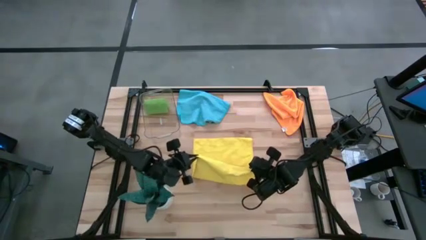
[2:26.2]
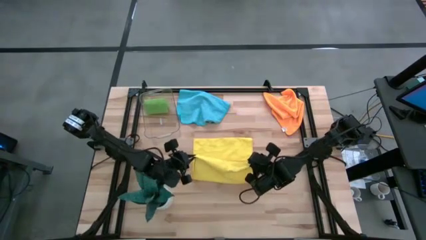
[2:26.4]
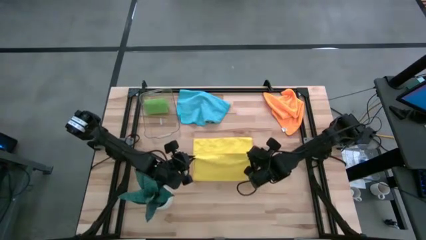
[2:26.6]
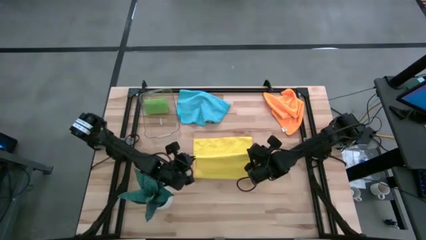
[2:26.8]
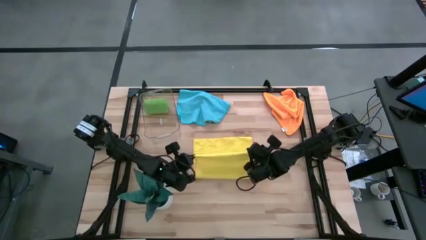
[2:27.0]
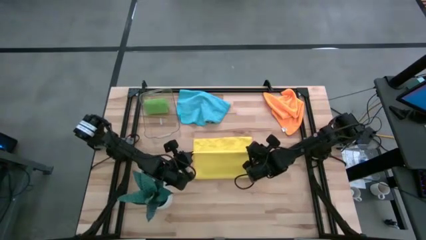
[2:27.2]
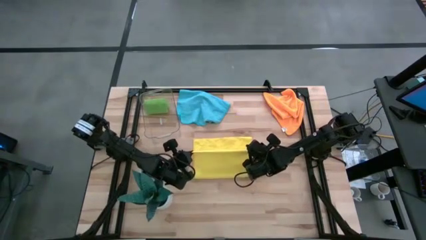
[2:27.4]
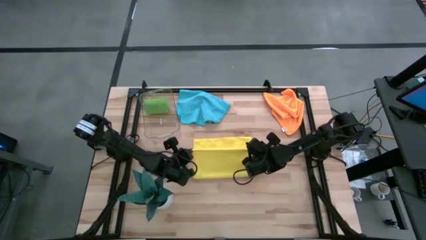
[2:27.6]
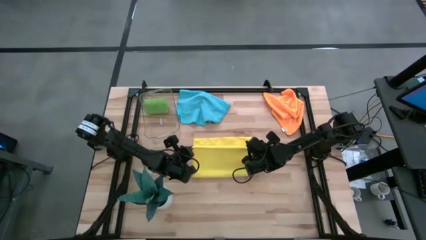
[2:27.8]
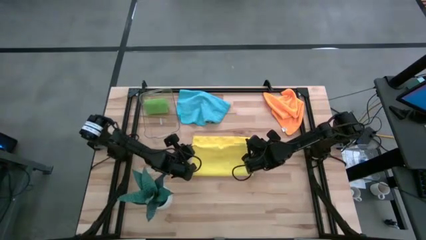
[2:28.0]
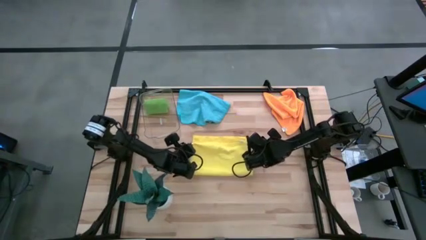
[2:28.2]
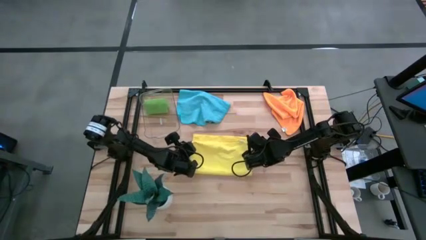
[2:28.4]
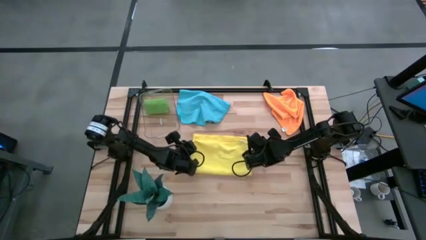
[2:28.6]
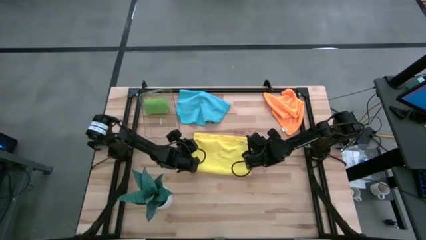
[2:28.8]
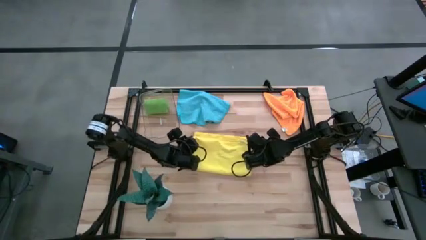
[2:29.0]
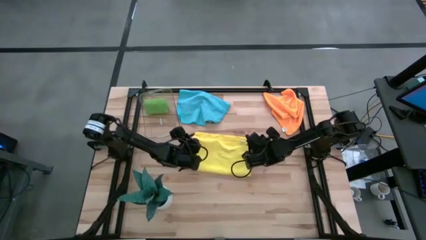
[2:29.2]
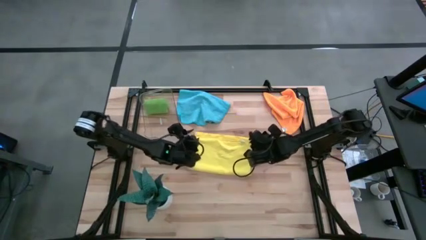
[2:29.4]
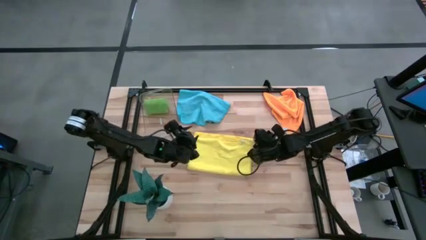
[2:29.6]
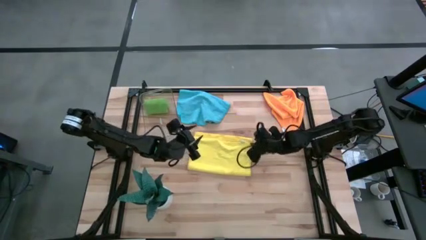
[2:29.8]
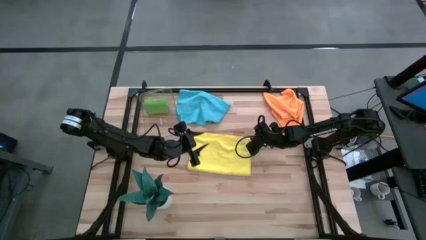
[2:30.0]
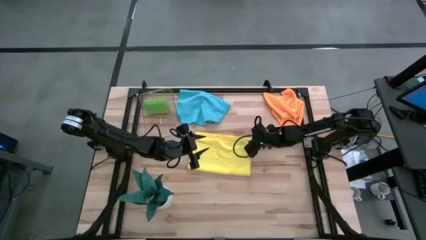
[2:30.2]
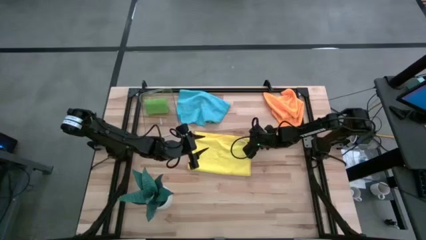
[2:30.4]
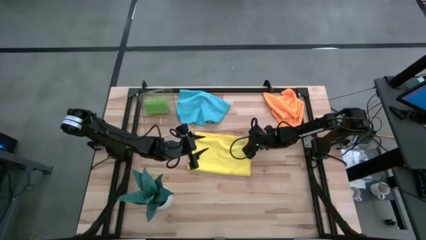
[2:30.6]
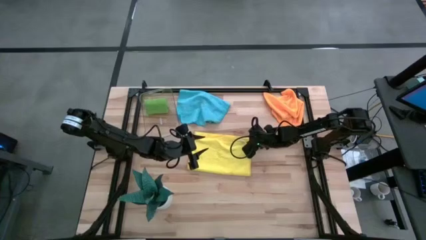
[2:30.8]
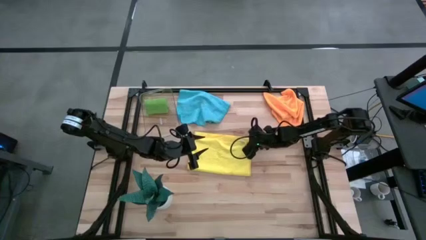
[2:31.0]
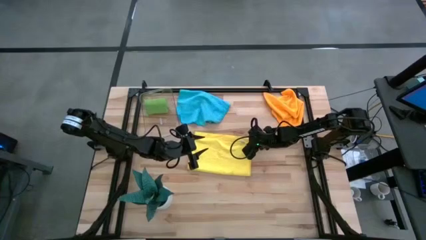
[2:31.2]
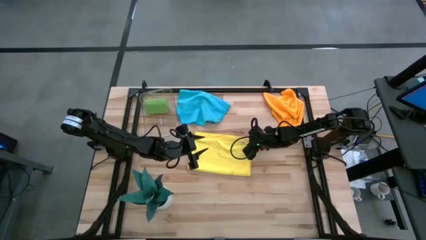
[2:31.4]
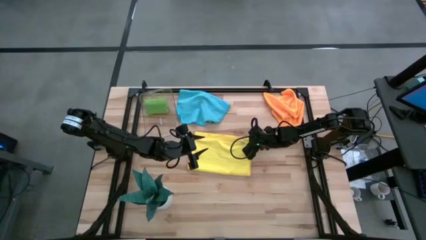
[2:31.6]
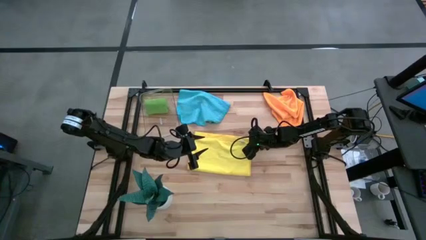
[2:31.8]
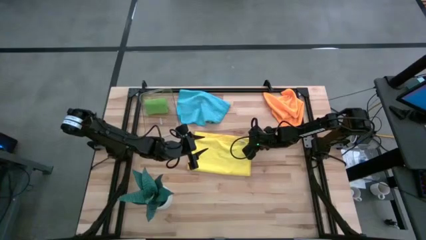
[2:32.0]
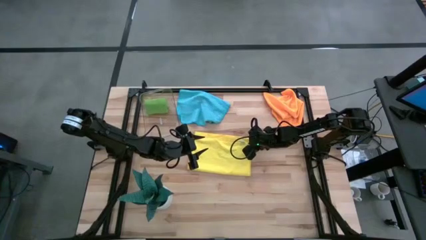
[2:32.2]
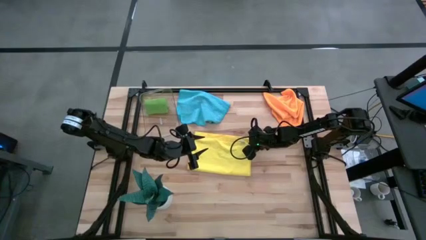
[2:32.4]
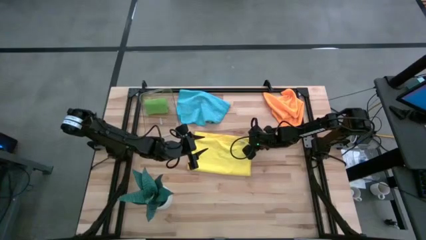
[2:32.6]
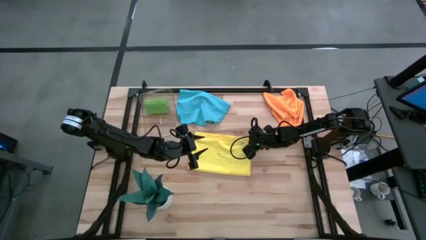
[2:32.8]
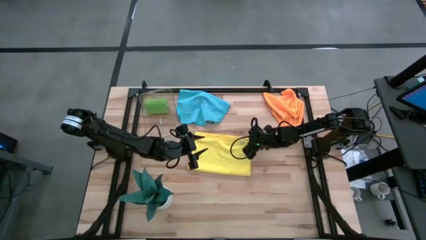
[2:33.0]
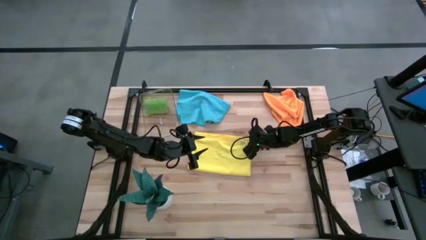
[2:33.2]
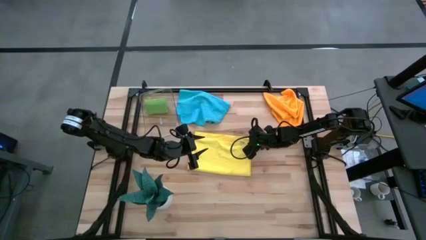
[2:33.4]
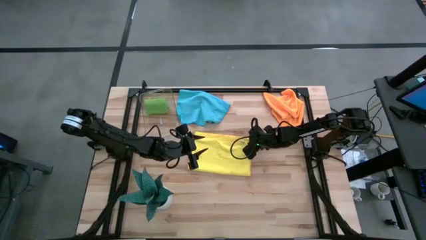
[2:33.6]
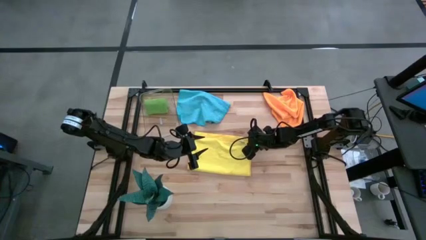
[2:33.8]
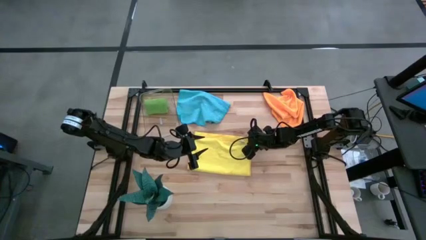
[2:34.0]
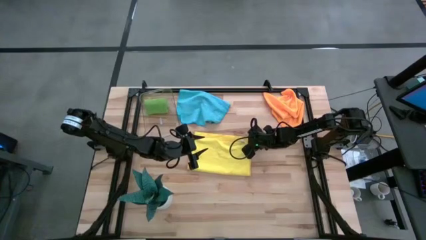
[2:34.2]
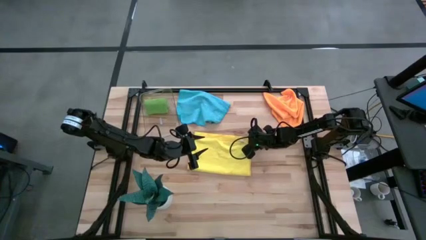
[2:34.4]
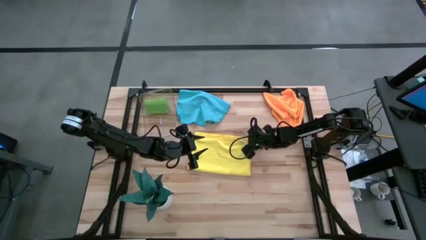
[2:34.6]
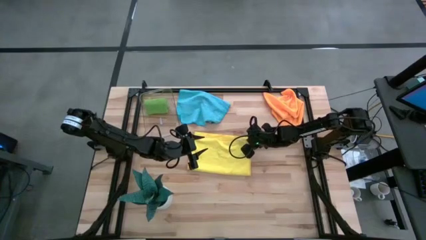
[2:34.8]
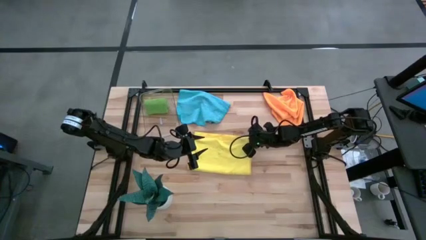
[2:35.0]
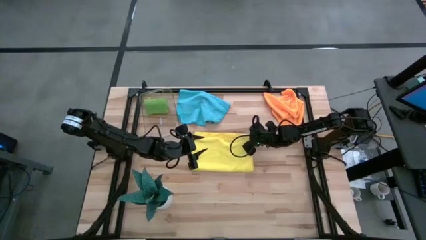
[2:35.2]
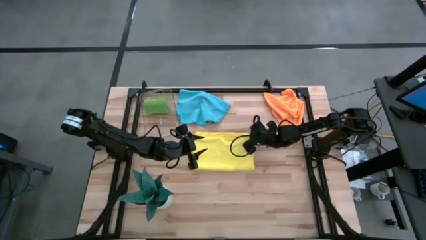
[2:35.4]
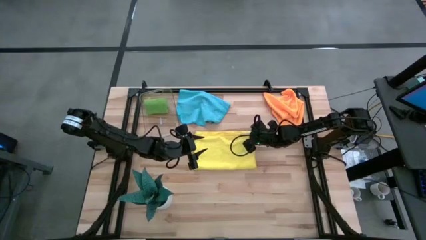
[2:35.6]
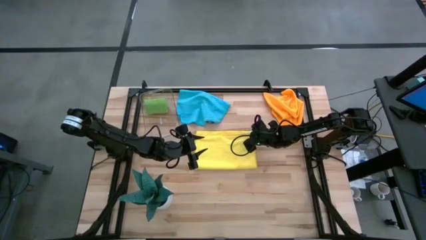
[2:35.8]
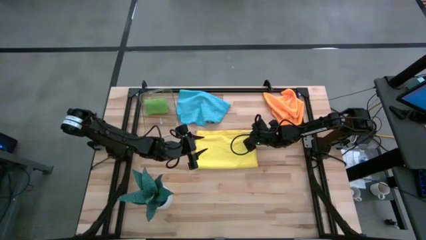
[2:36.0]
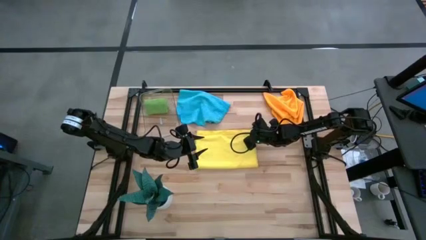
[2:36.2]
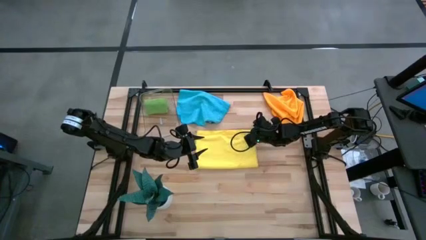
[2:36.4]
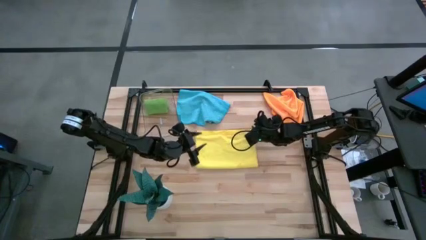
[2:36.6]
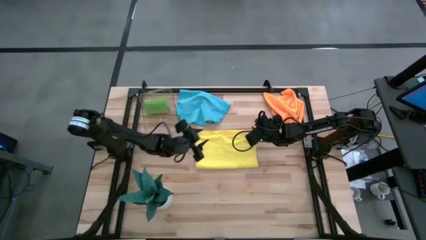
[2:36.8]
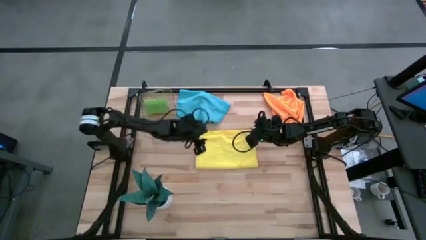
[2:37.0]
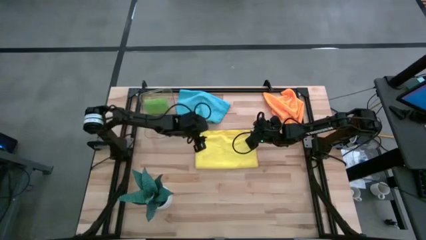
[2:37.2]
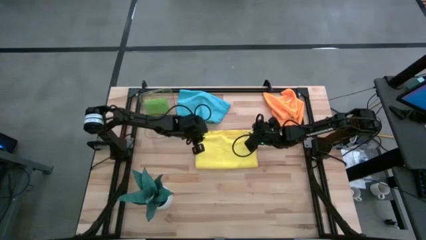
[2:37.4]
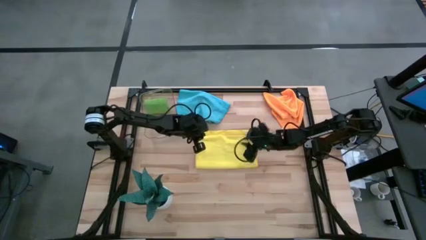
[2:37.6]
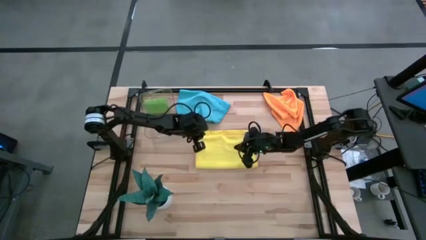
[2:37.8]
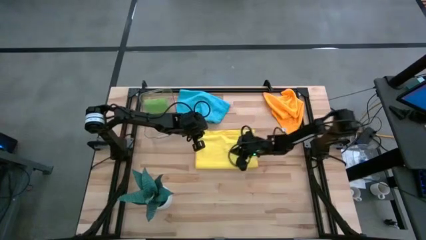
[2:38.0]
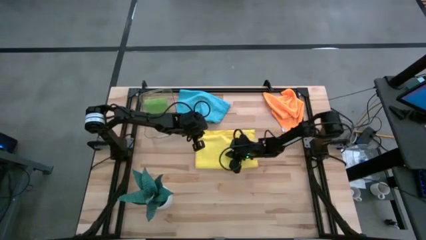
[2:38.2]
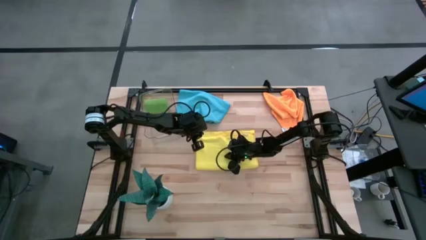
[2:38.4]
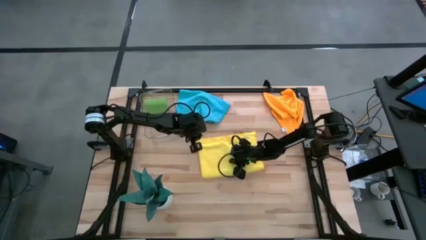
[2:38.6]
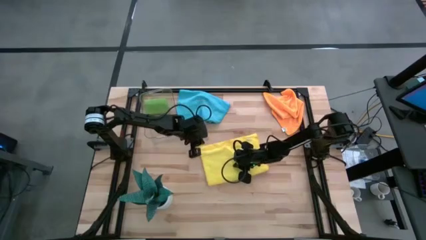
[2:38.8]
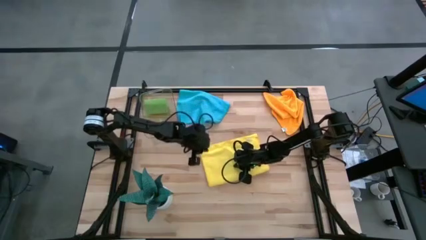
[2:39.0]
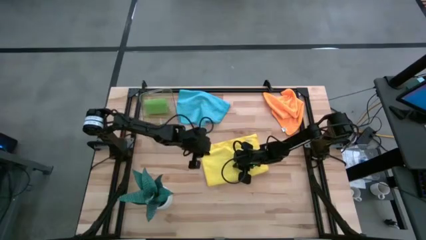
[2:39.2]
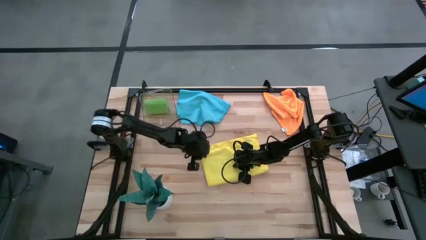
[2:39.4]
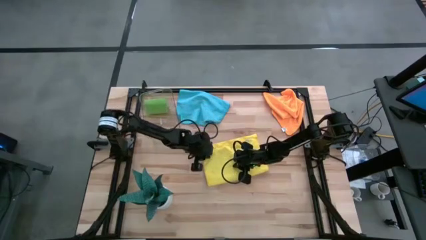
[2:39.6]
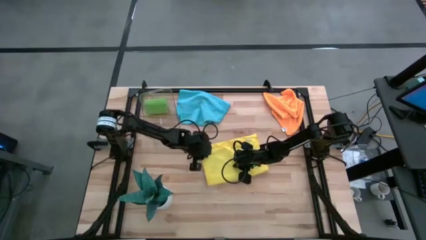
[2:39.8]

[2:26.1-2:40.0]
Task: Roll microfiber towels into tight, uniform cylinder then place into a basket
Fold the yellow microfiber towel

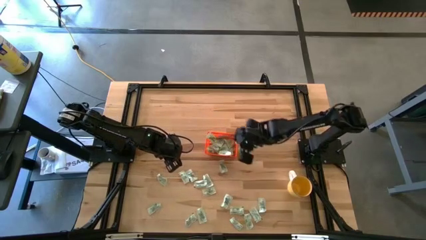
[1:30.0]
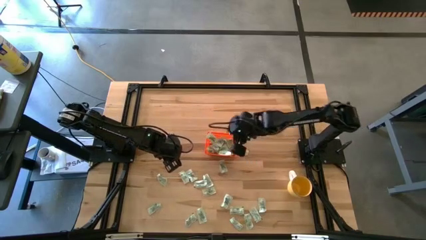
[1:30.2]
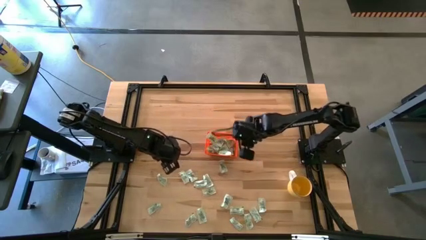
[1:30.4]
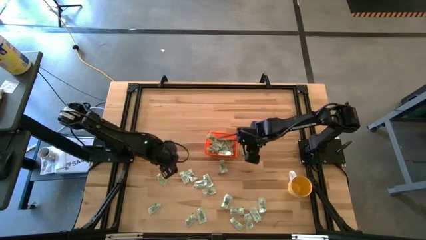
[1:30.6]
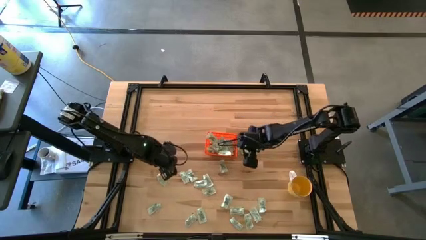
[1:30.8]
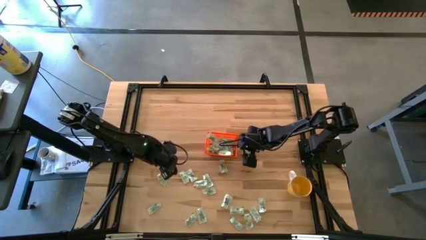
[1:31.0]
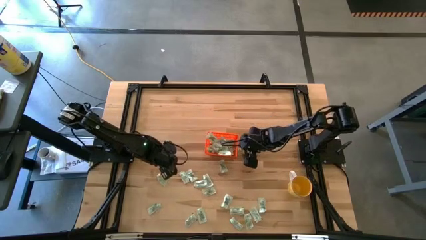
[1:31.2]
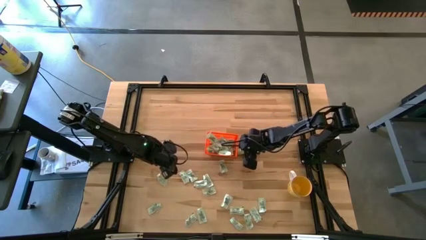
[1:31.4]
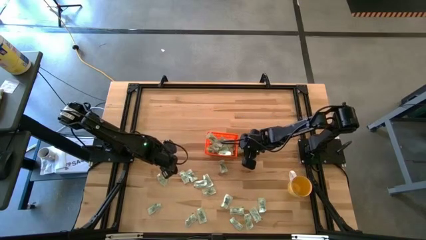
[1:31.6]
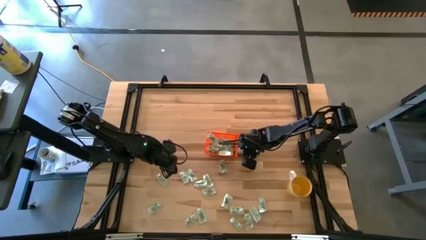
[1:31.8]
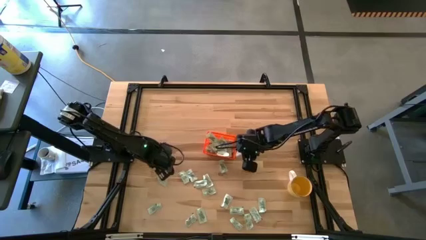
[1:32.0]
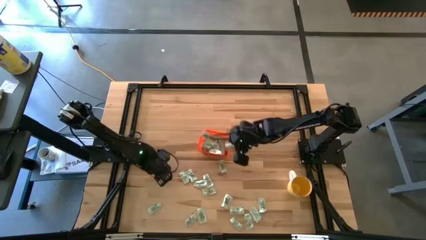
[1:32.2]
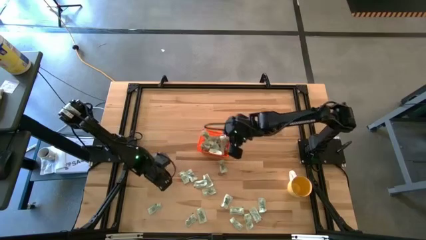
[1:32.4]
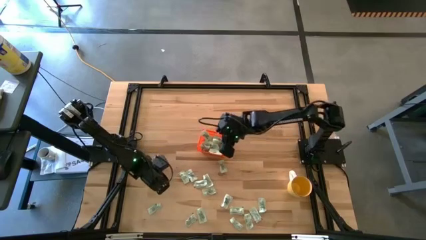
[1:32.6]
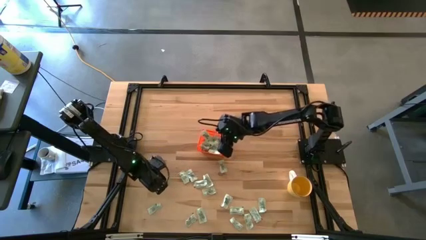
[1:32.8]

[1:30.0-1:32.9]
Task: Pick and place Stevia / Truvia into bins
Put the light green stevia packet into the orange bin

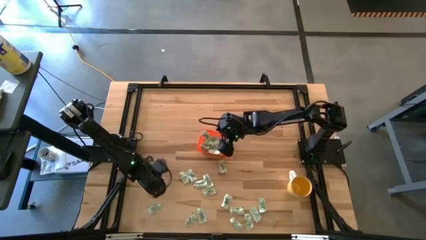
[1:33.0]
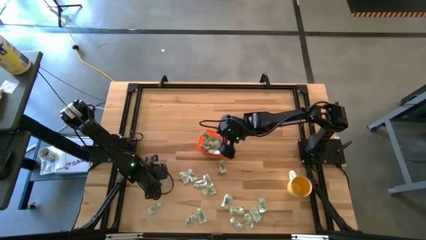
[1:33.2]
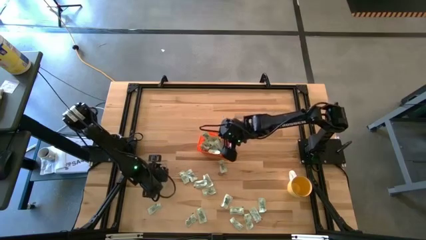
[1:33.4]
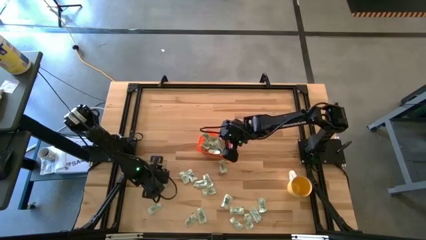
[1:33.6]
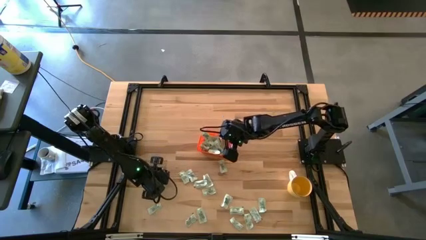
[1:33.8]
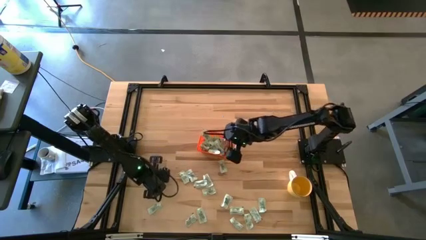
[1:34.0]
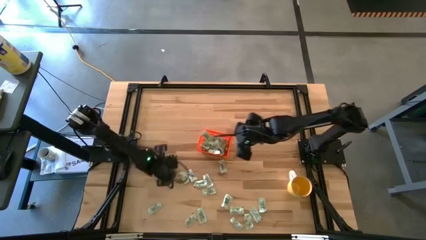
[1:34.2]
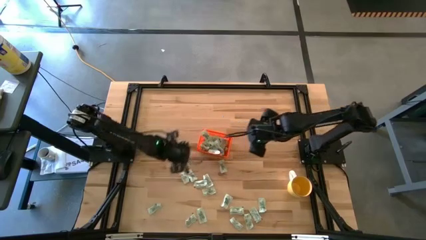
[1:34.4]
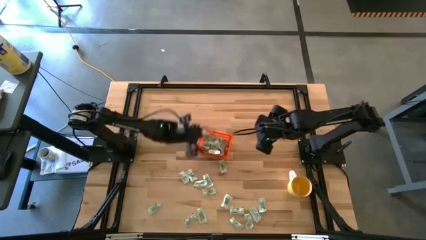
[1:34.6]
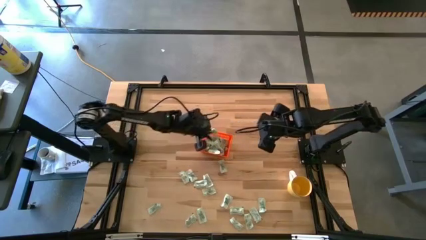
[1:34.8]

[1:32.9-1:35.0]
Put the light green stevia packet into the orange bin
